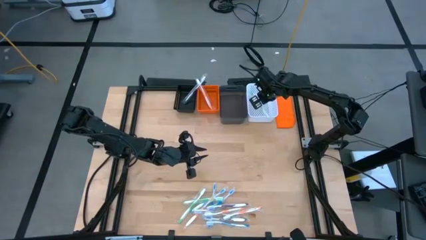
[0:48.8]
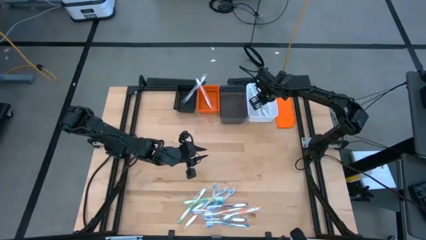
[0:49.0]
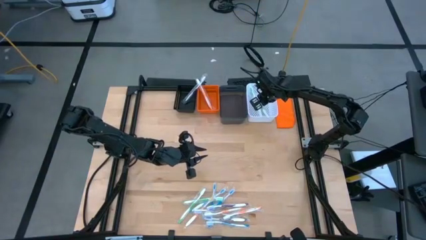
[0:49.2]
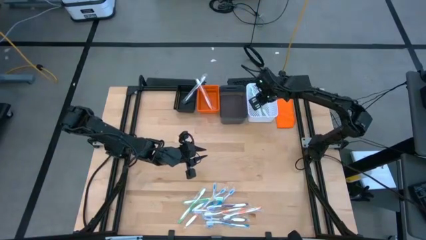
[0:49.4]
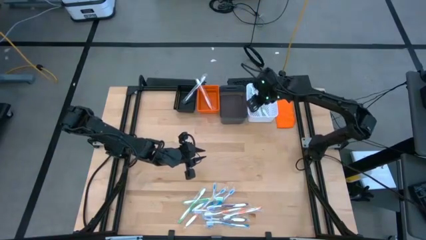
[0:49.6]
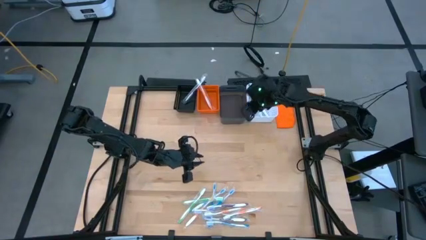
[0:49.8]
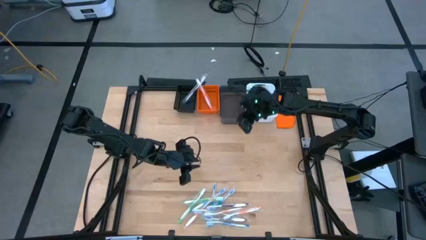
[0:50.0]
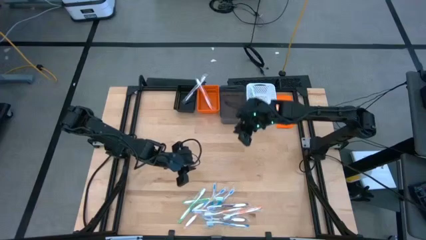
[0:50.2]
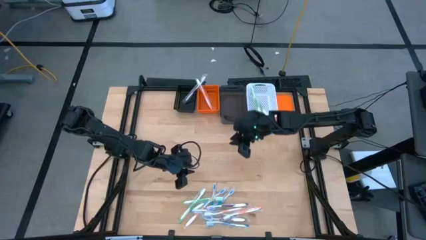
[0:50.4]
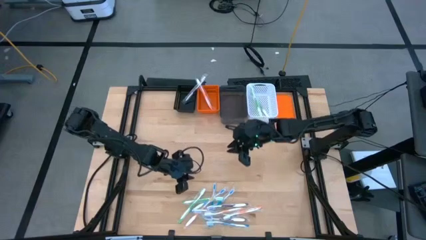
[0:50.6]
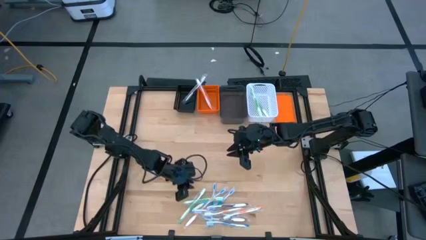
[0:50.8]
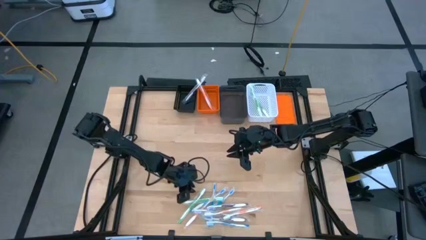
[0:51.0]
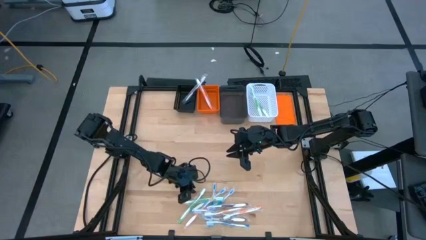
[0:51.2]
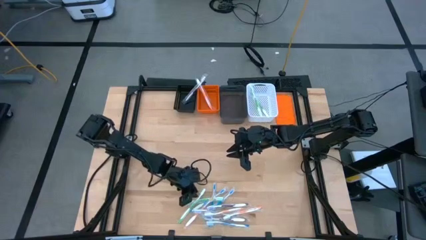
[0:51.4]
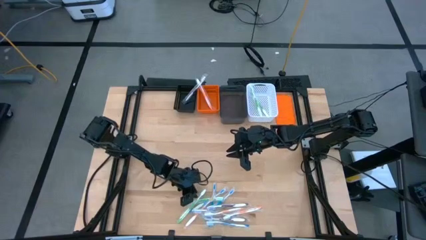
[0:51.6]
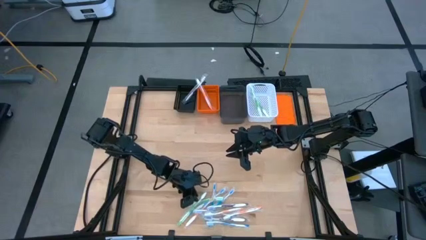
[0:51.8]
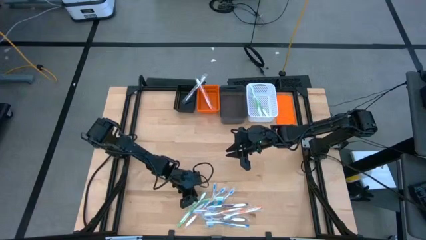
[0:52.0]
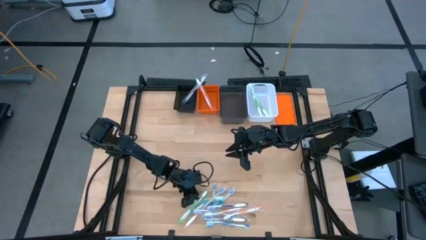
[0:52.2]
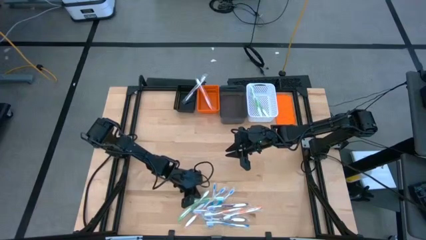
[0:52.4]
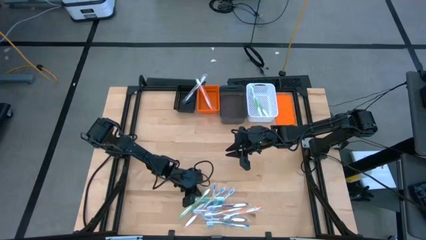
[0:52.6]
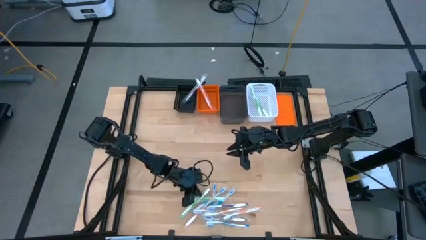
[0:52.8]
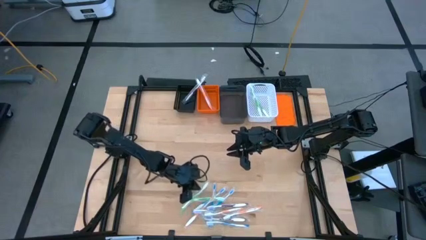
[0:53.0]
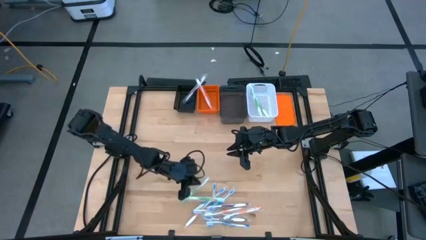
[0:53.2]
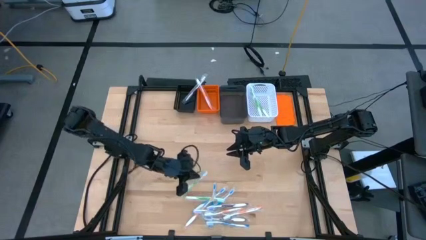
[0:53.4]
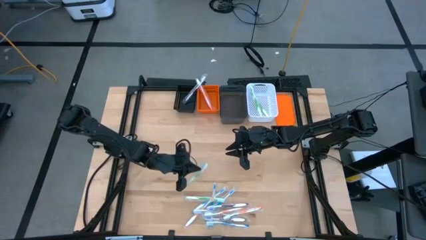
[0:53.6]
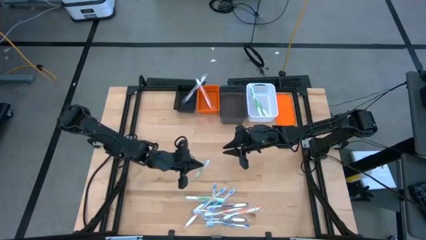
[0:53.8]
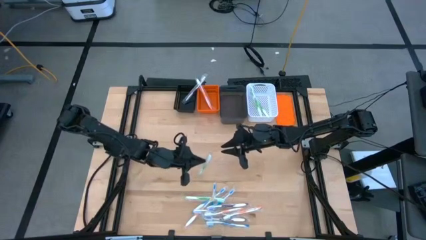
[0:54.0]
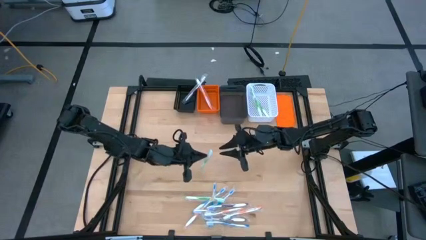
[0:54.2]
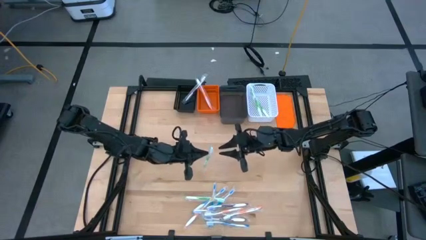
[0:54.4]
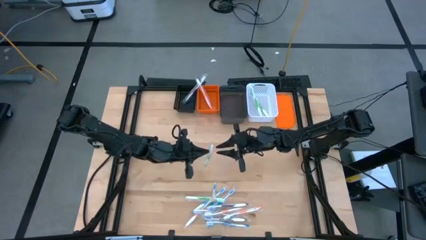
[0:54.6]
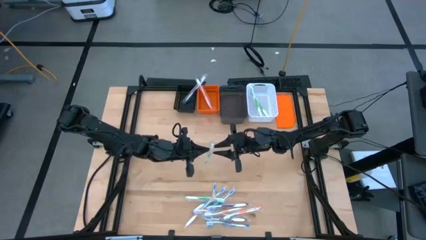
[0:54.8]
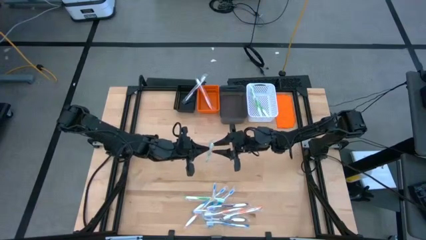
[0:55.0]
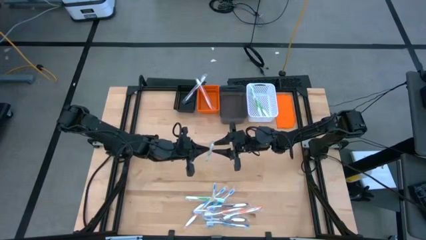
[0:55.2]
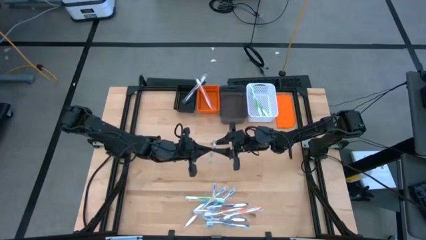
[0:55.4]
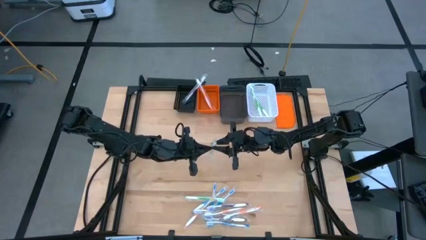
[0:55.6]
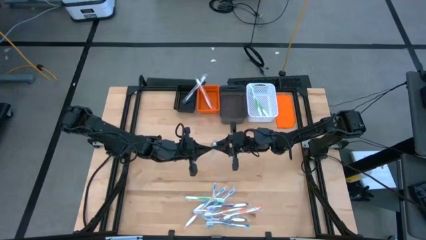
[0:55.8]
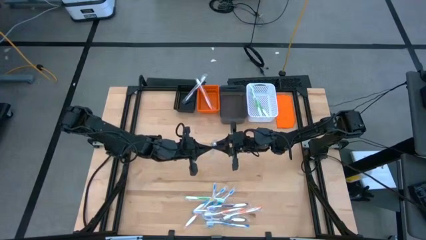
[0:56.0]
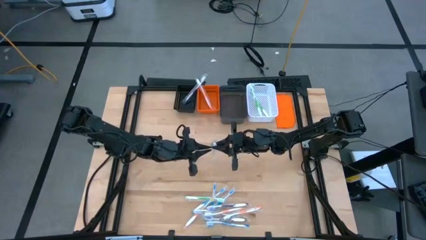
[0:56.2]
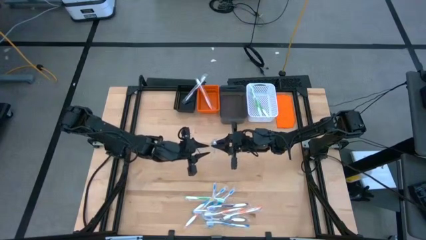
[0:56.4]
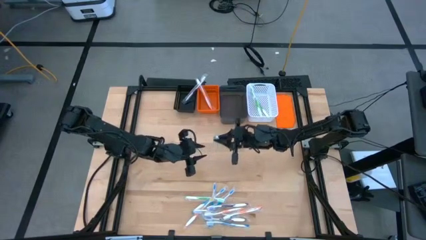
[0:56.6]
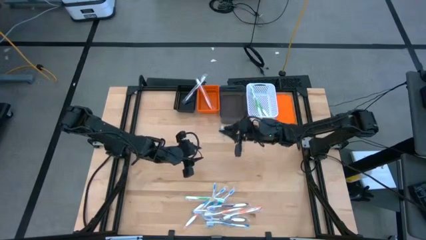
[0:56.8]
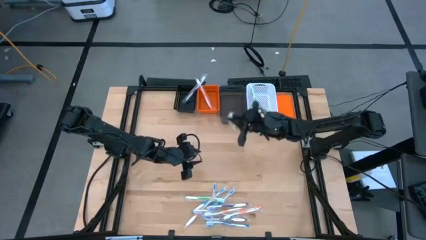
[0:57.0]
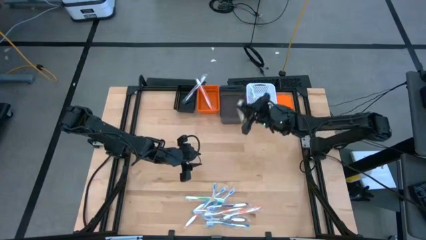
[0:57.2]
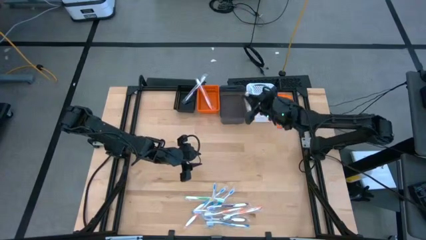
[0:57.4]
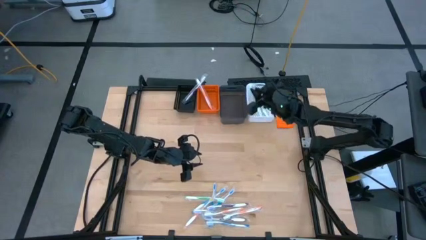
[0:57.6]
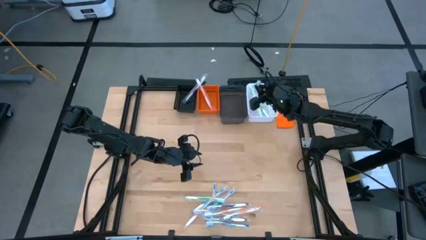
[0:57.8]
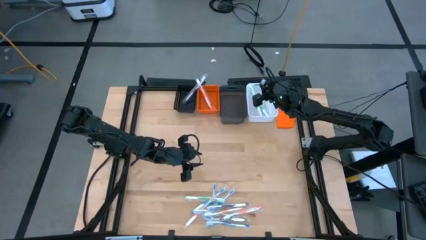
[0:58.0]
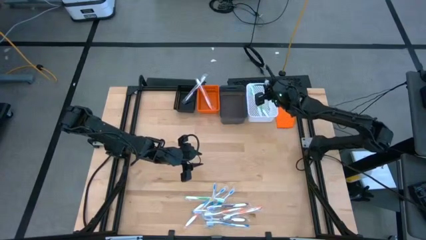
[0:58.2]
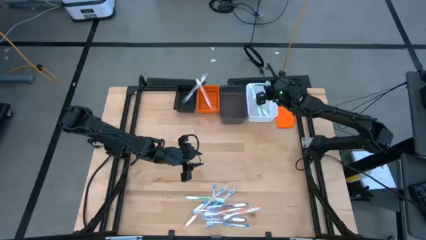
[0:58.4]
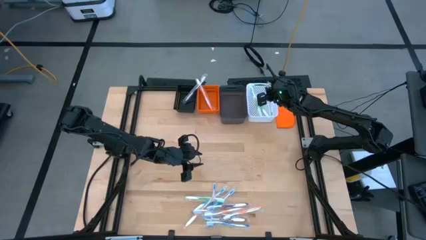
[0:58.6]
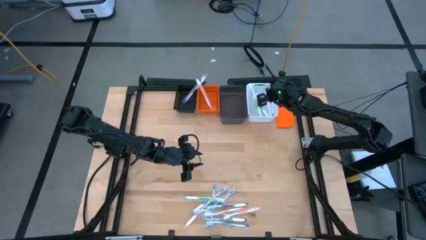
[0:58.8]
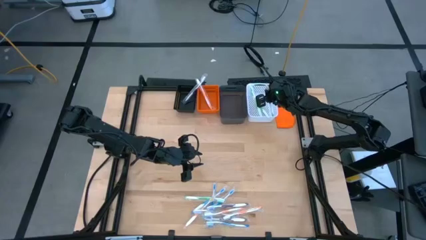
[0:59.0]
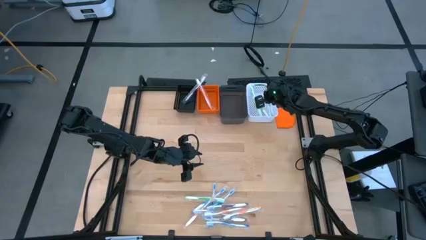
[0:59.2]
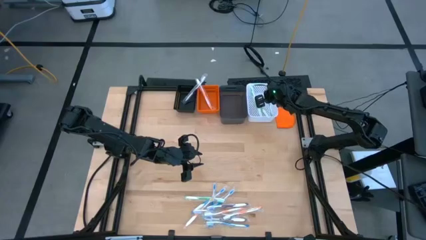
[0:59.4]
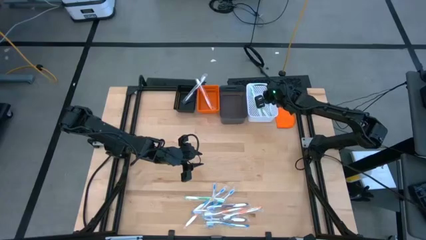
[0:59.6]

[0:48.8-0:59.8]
Task: Pick & Place Toothbrushes
Put the green toothbrush into the white bin

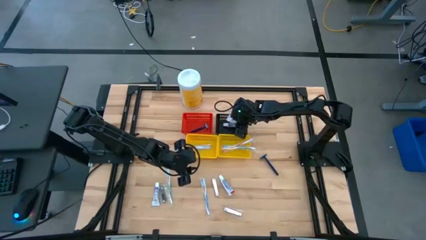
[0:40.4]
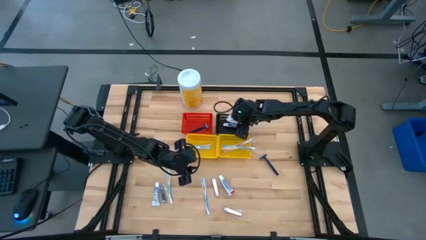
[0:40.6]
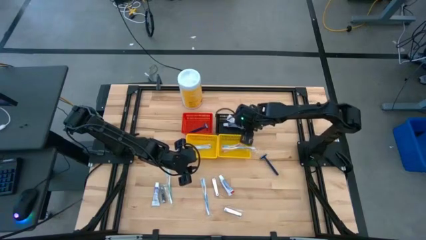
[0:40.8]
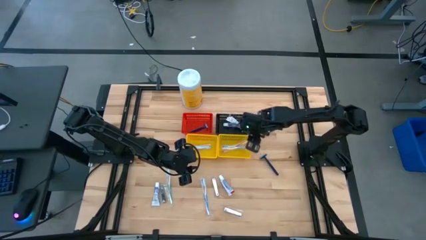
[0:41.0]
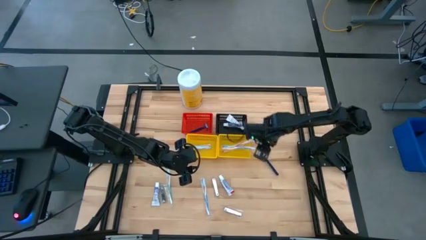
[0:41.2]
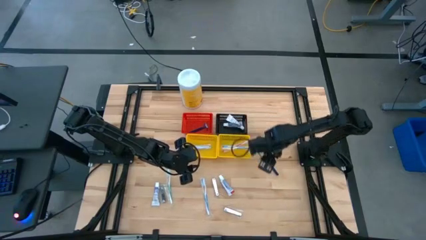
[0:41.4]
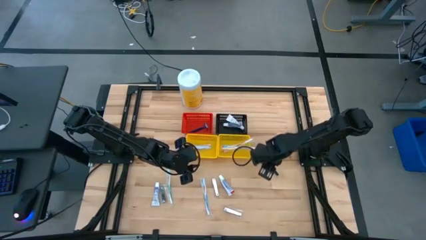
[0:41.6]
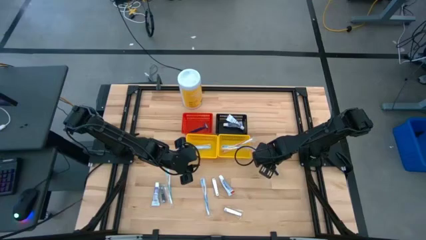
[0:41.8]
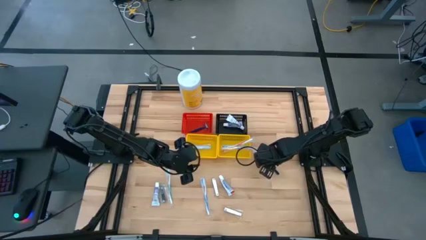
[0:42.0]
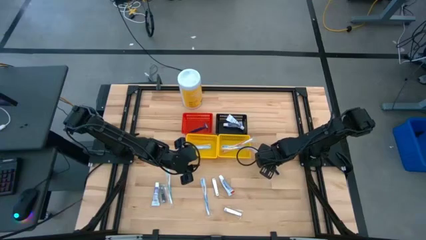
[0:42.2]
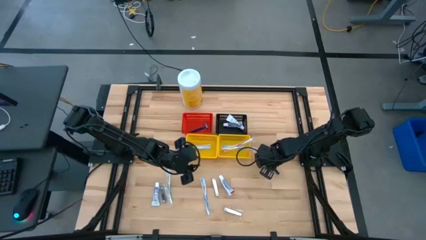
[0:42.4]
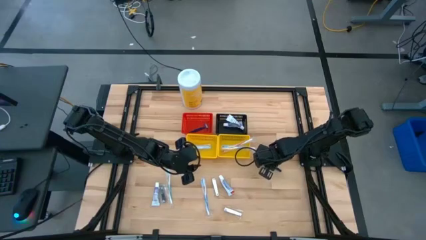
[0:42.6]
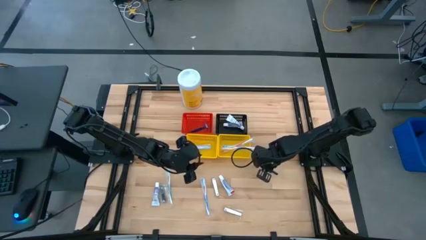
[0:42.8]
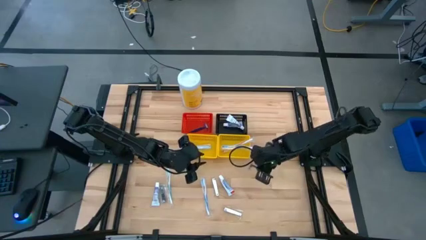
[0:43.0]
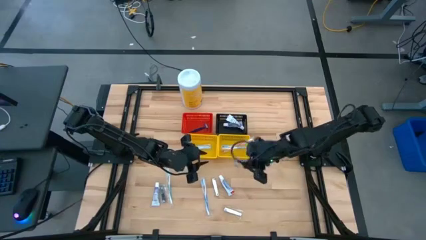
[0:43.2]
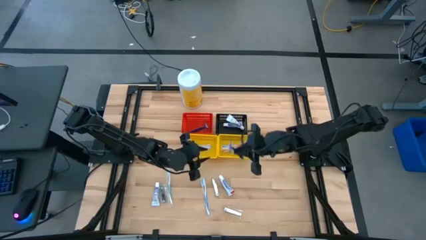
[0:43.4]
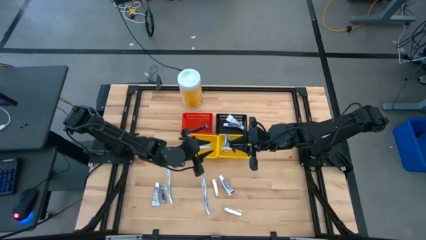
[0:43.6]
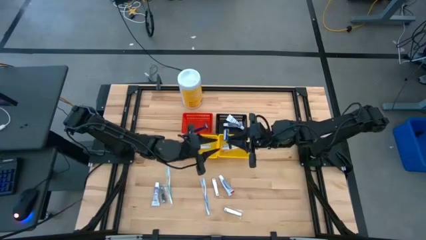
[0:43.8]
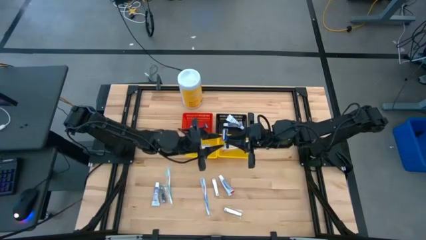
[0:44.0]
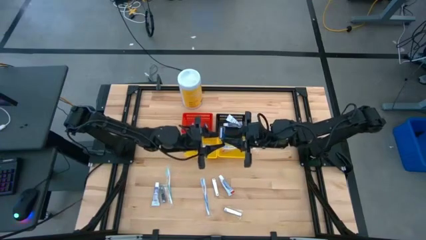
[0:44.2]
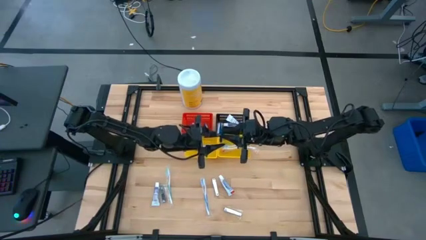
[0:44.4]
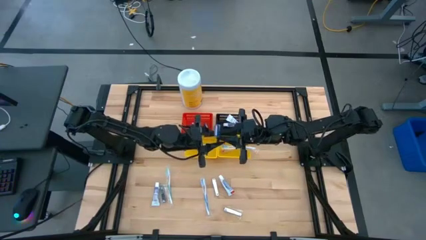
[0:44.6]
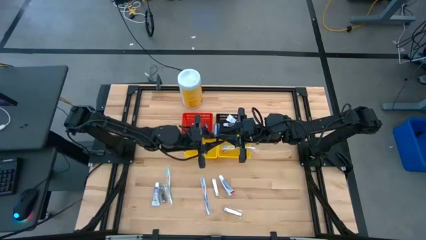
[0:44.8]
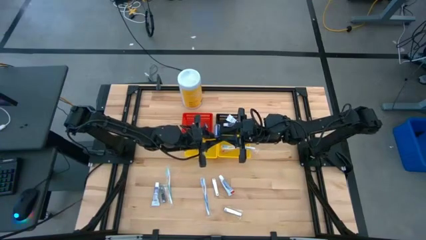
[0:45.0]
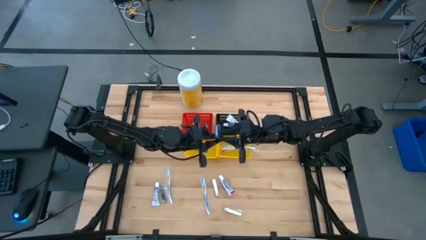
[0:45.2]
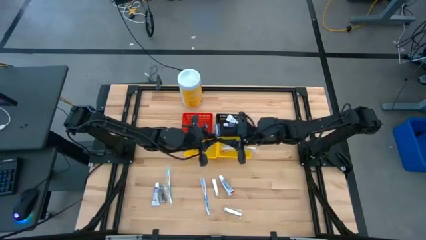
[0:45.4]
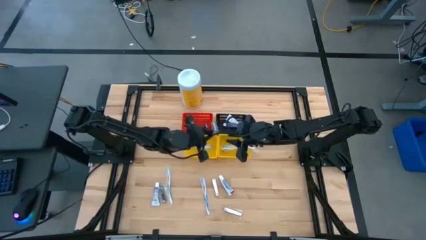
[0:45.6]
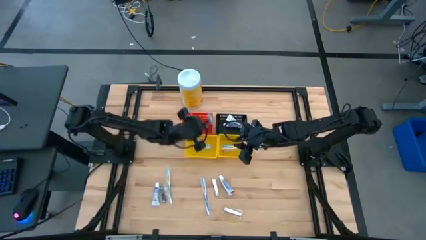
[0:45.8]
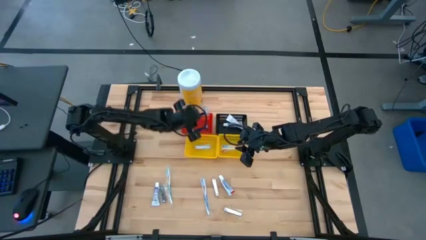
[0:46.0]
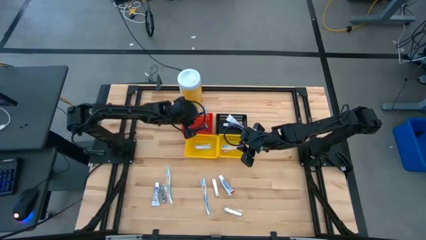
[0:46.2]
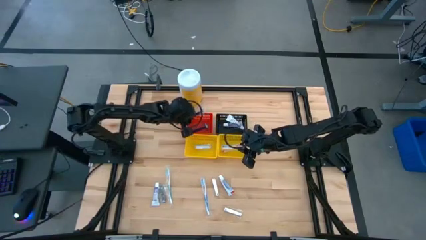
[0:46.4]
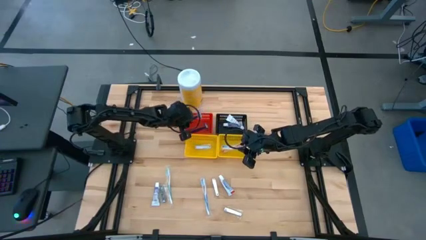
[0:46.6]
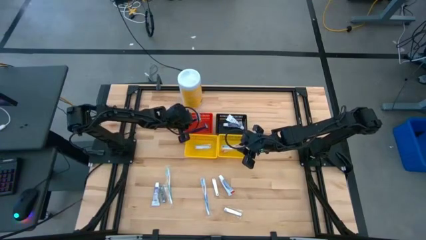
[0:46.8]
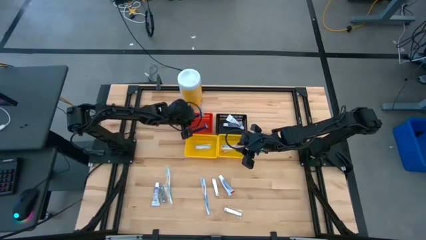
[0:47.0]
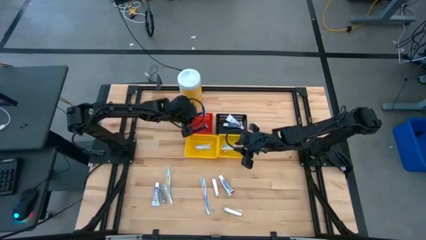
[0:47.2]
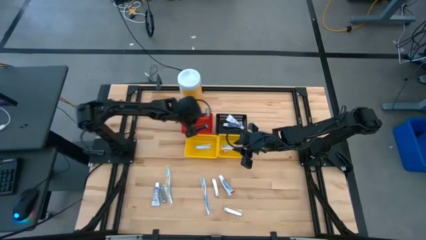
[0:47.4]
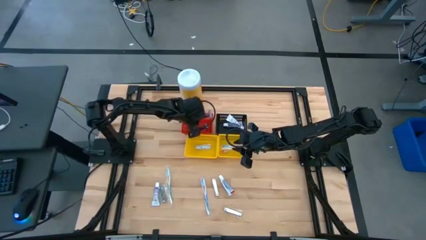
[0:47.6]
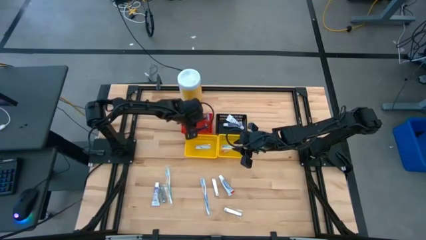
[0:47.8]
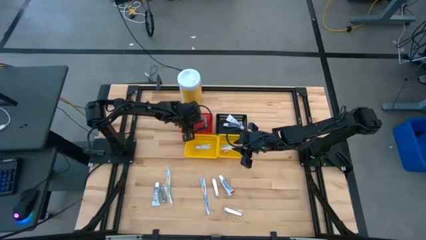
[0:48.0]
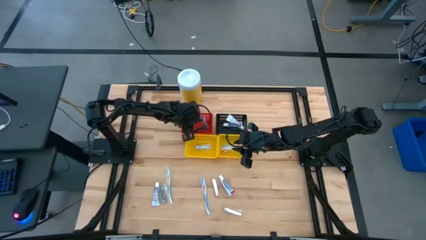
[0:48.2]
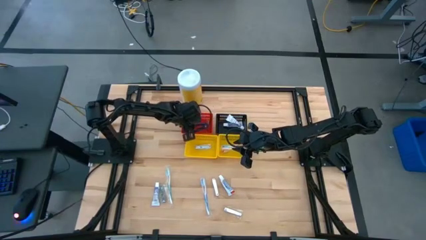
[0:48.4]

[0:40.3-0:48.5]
Task: Pick & Place Travel size toiletries
Put the blue razor into the red bin
